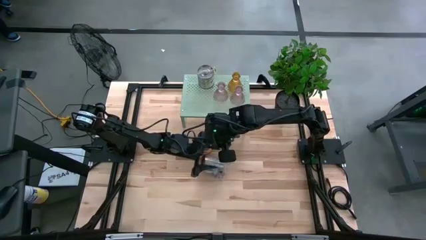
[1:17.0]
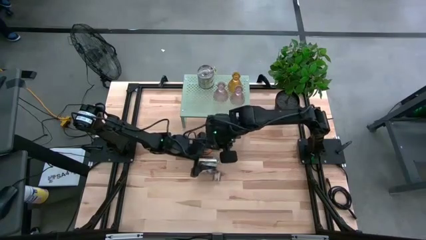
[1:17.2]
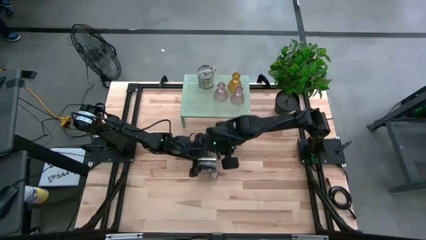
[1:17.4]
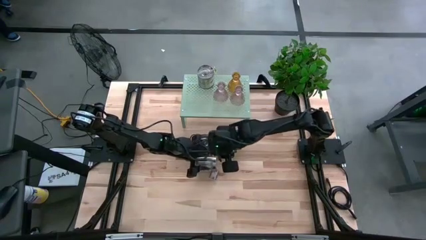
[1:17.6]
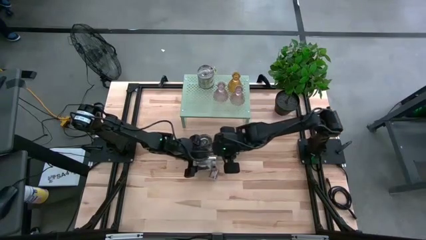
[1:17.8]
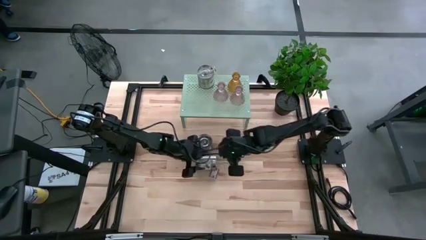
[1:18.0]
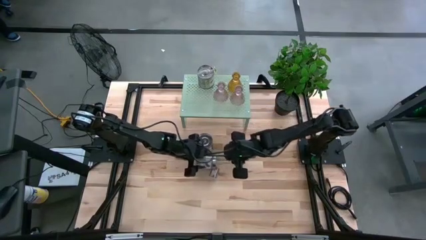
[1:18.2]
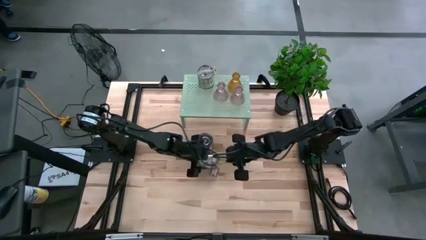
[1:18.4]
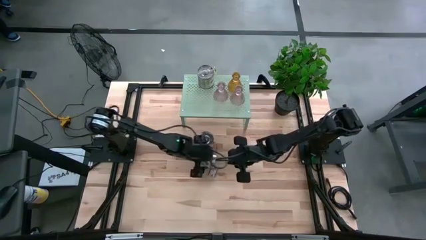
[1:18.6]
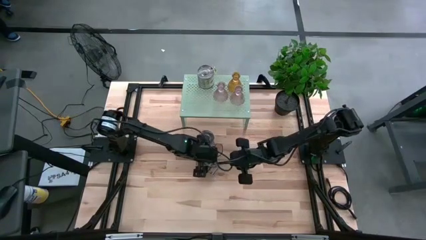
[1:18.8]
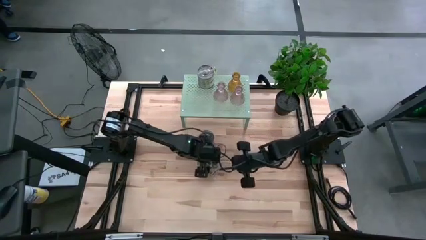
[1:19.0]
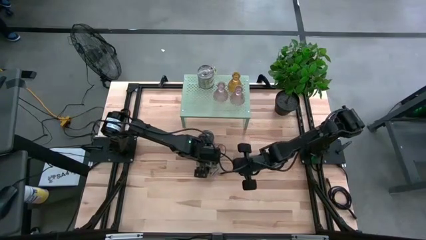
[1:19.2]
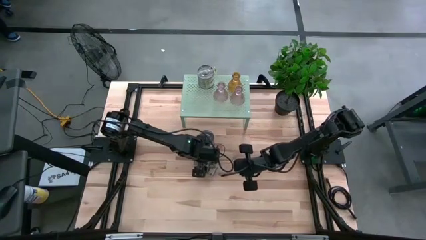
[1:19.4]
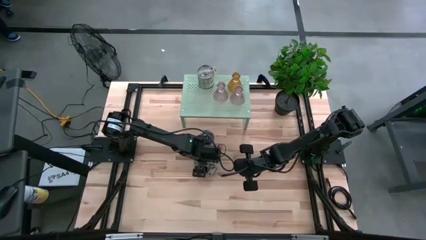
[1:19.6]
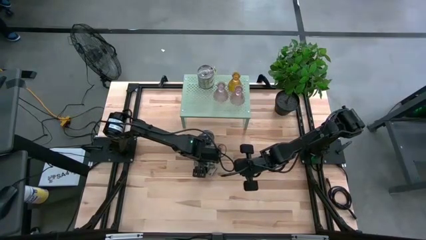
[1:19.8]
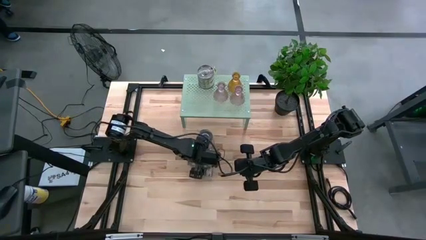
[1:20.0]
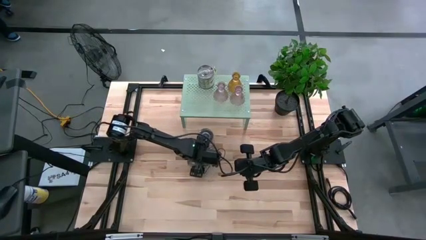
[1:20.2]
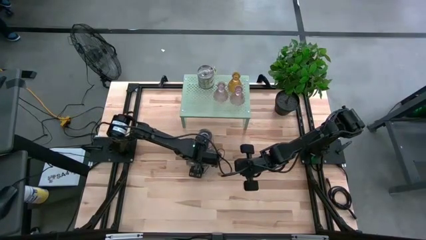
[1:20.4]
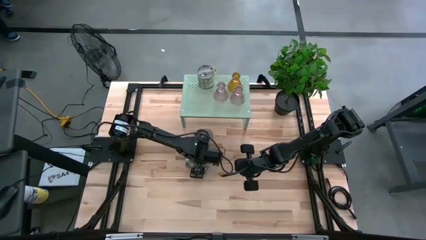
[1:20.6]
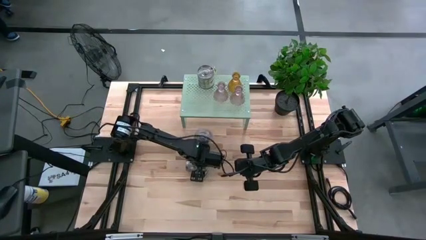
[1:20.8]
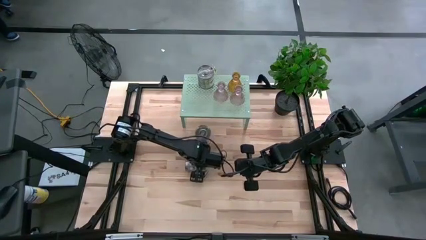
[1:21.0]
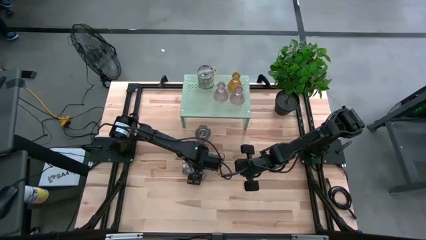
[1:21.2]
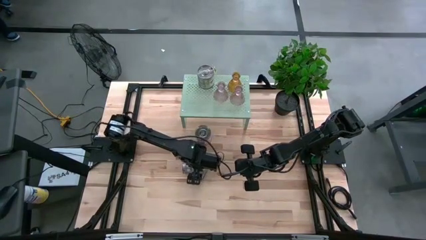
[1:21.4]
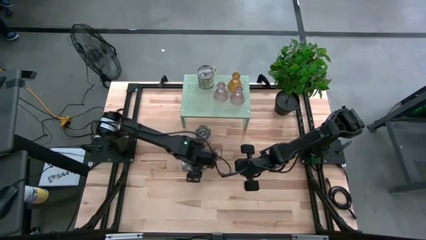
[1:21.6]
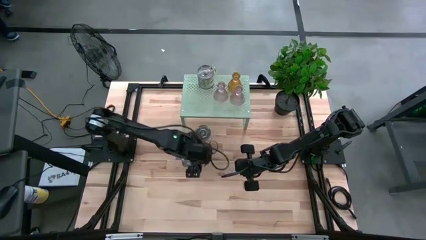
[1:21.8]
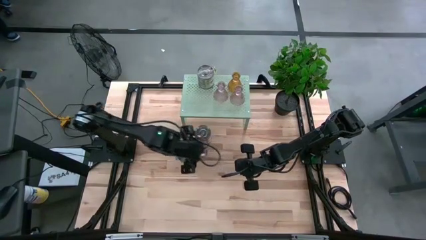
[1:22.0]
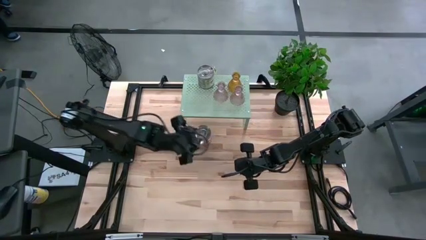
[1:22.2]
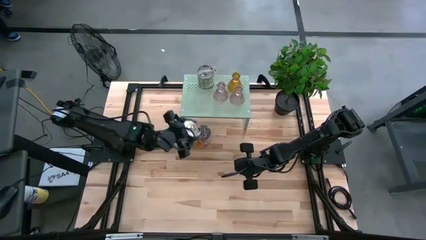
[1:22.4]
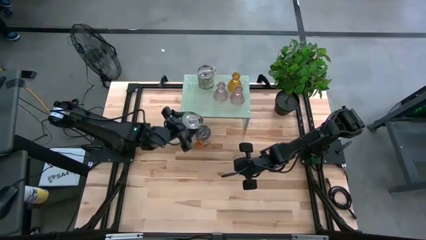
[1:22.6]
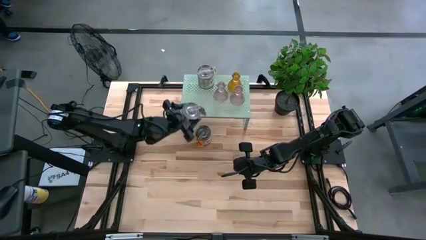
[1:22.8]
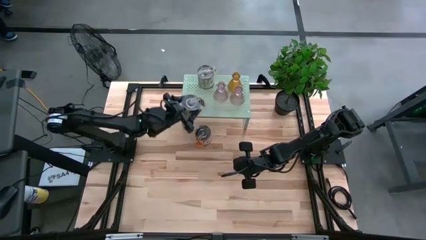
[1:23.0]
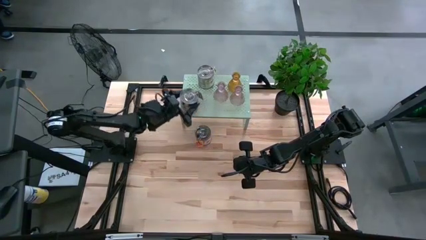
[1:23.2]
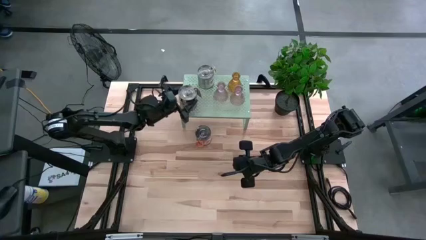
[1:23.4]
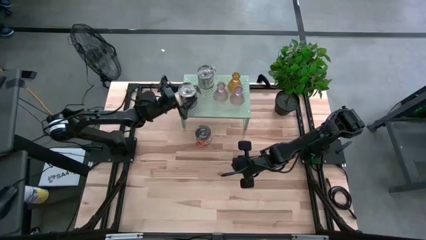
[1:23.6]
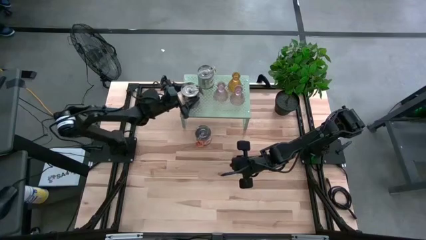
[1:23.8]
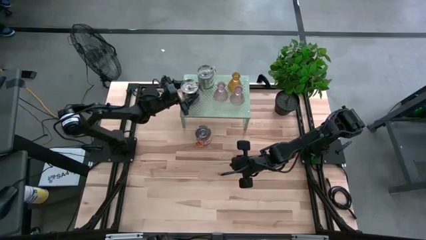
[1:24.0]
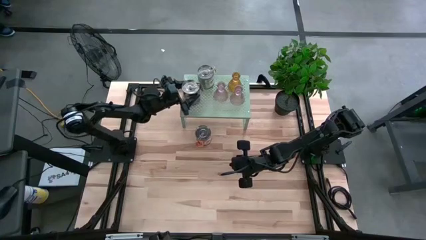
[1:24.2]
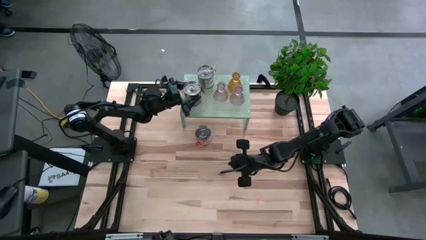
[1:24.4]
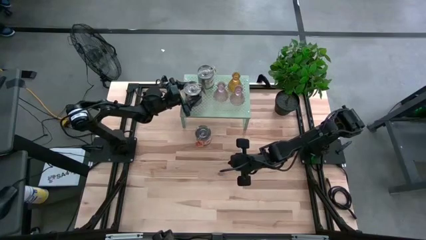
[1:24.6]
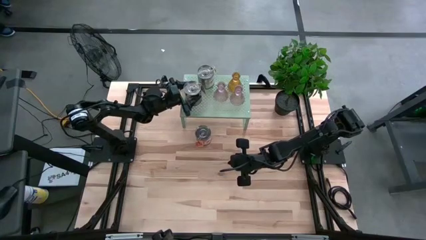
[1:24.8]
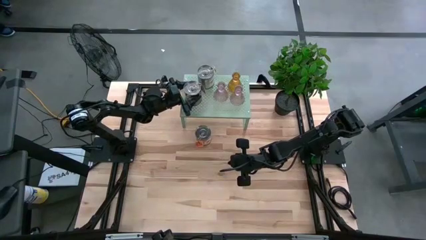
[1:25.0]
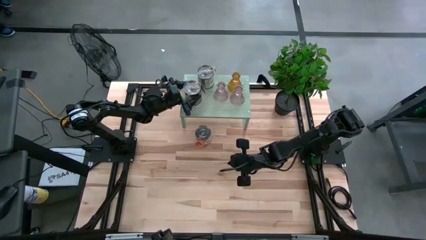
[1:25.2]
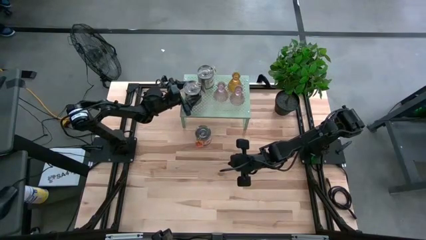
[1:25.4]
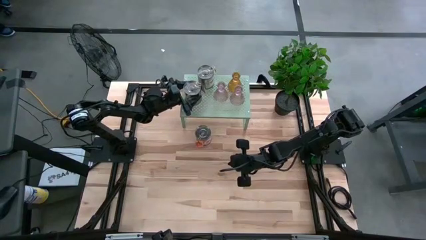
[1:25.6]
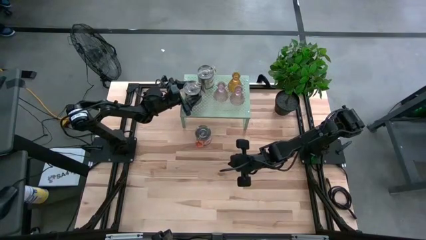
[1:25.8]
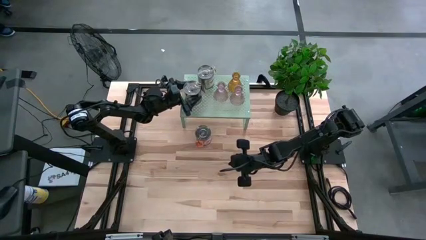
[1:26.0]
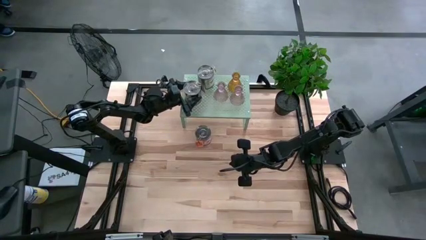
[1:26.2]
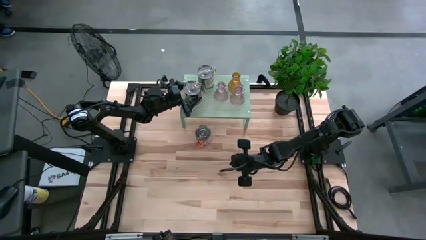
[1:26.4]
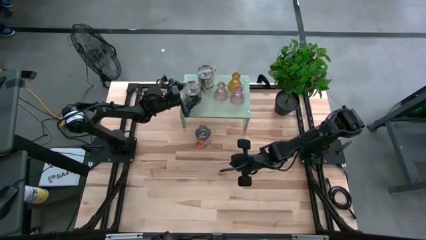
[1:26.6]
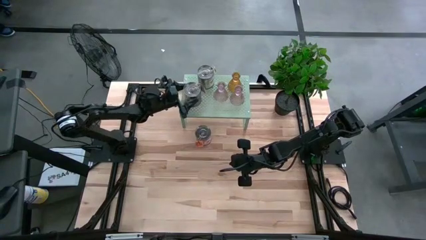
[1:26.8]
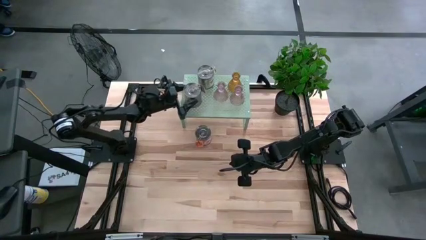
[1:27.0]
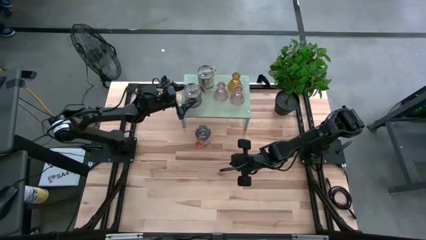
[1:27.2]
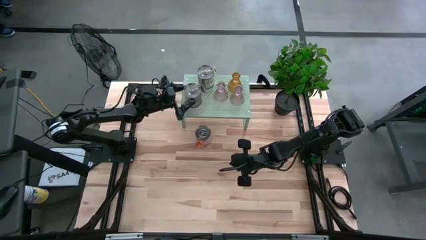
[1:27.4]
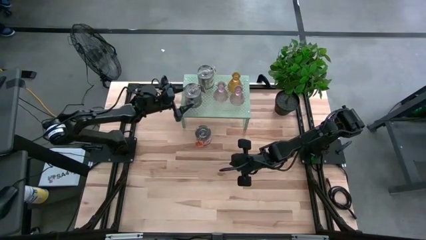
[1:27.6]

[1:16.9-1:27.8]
Task: Pick & Place candle stick holders
Put the brown scented candle on the shelf
